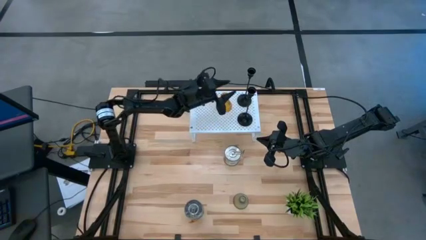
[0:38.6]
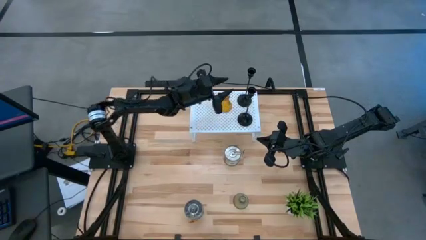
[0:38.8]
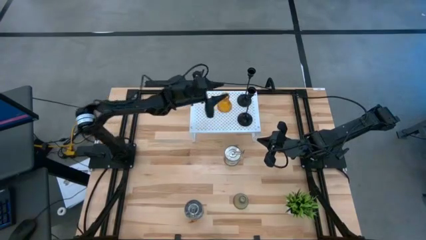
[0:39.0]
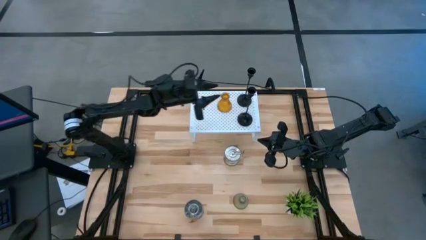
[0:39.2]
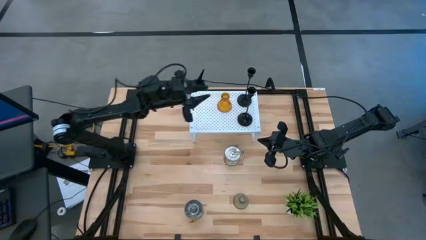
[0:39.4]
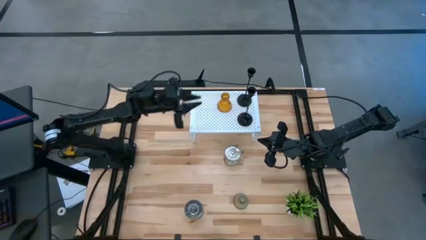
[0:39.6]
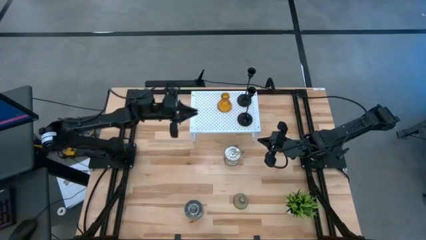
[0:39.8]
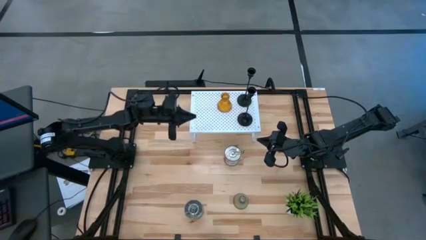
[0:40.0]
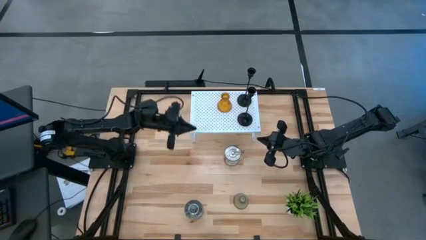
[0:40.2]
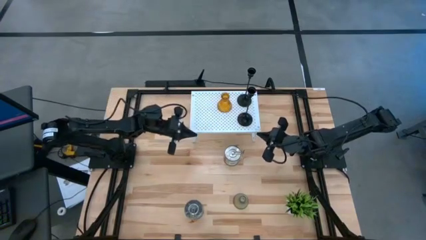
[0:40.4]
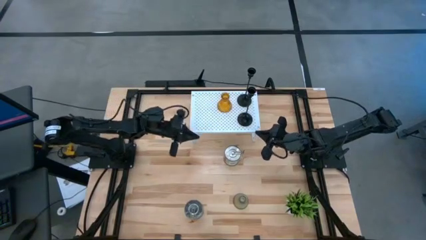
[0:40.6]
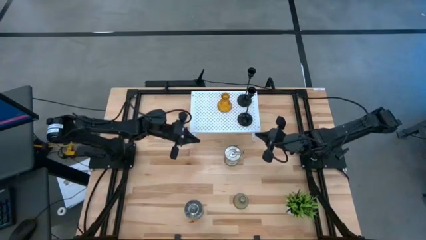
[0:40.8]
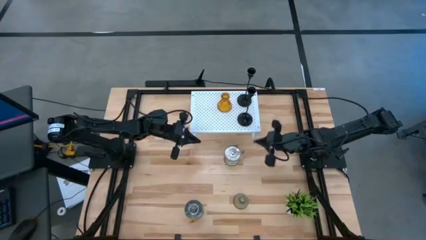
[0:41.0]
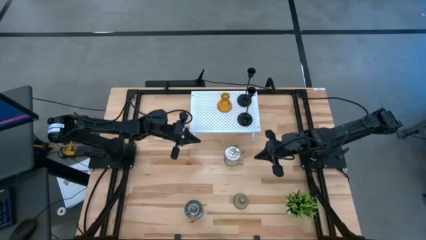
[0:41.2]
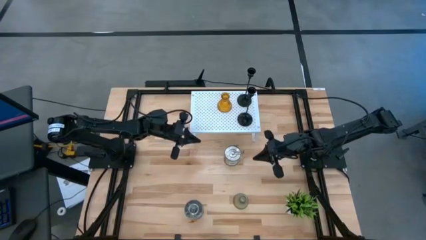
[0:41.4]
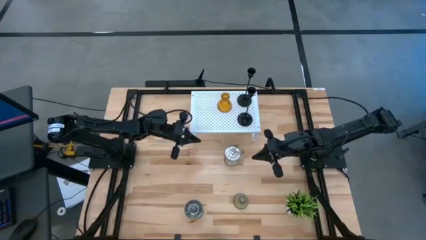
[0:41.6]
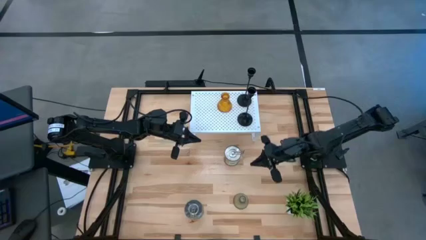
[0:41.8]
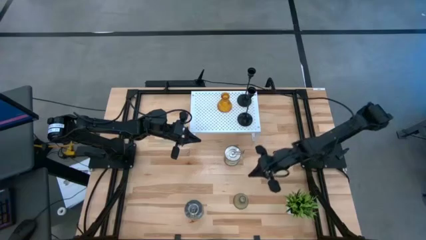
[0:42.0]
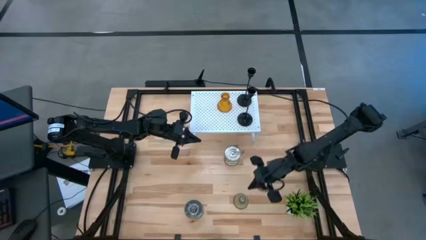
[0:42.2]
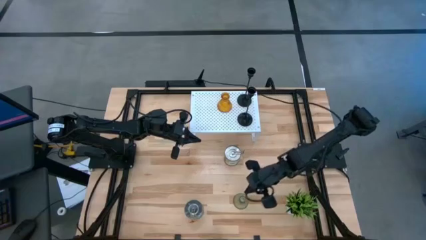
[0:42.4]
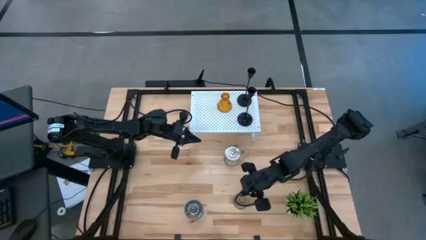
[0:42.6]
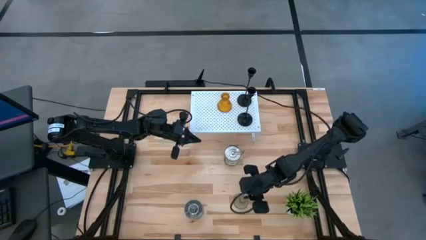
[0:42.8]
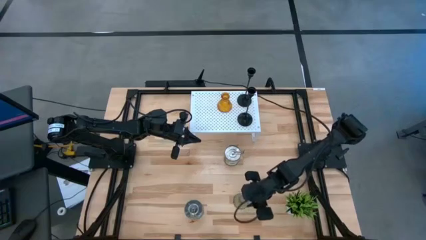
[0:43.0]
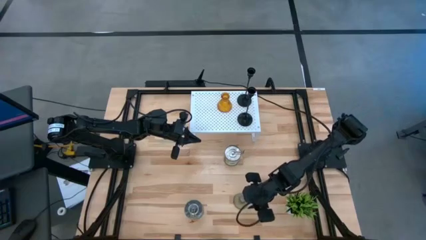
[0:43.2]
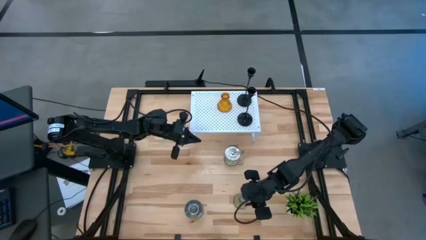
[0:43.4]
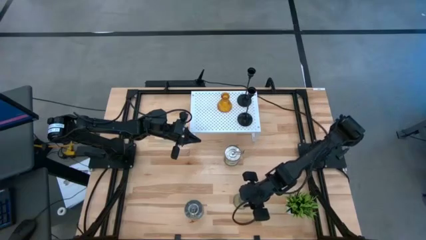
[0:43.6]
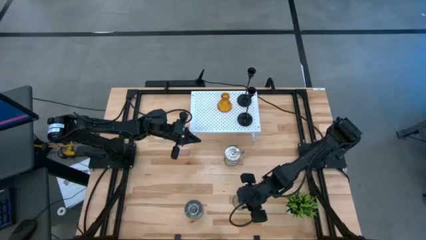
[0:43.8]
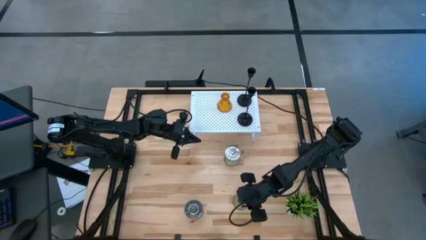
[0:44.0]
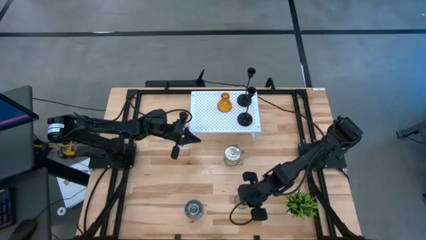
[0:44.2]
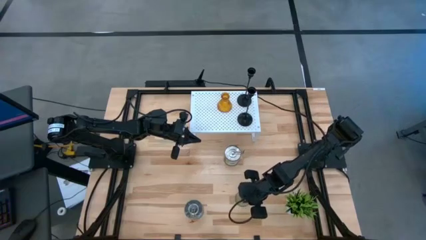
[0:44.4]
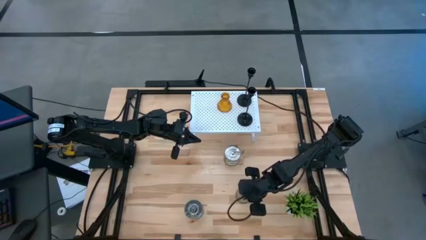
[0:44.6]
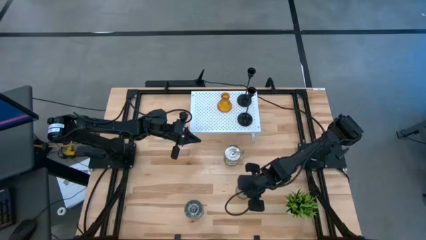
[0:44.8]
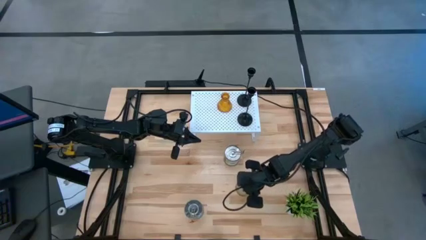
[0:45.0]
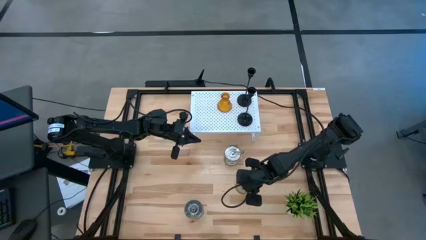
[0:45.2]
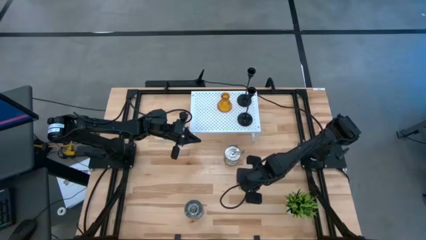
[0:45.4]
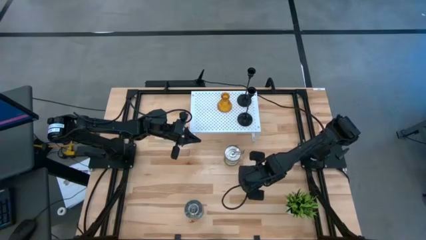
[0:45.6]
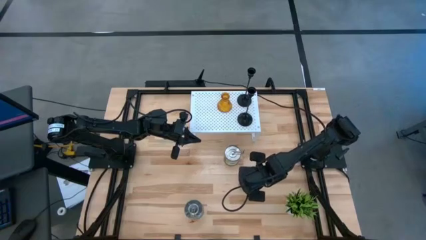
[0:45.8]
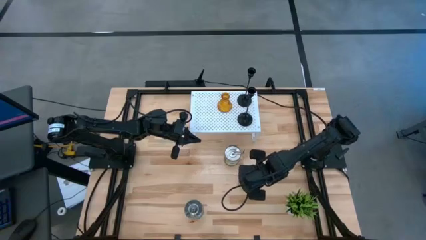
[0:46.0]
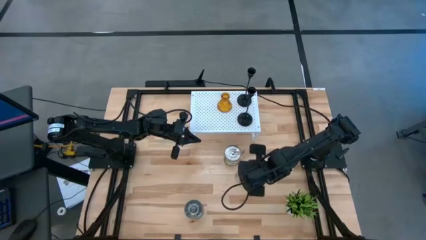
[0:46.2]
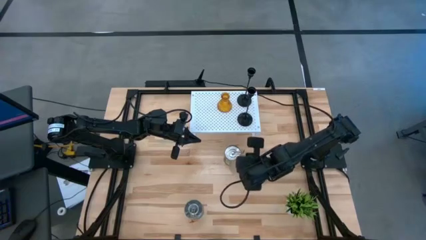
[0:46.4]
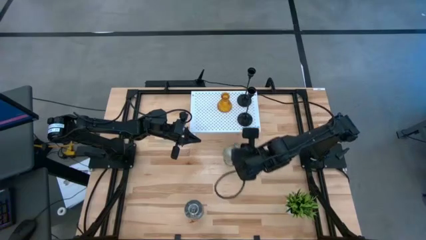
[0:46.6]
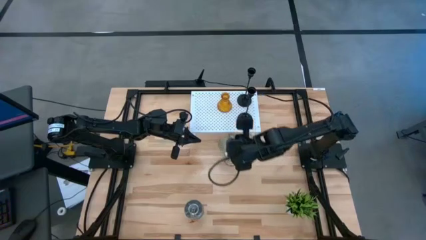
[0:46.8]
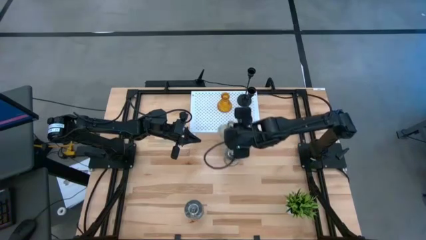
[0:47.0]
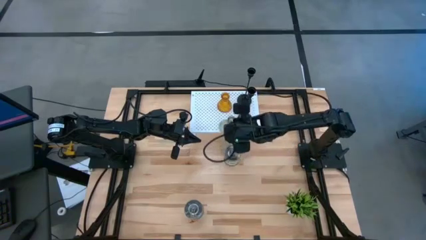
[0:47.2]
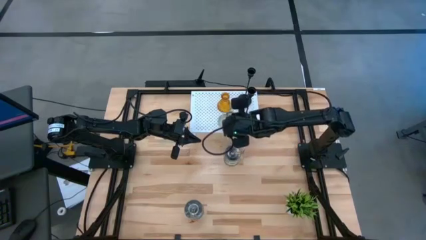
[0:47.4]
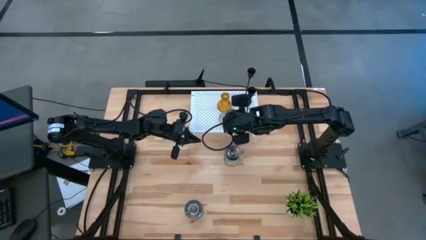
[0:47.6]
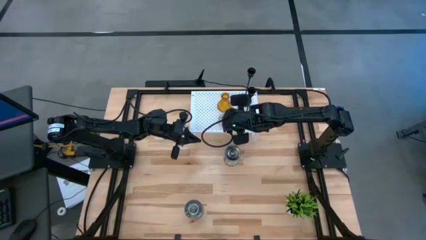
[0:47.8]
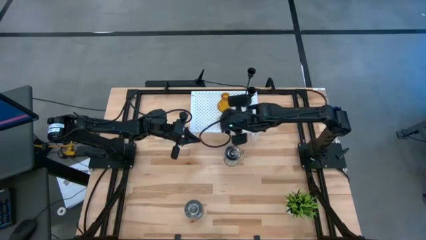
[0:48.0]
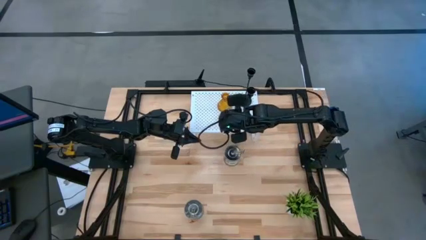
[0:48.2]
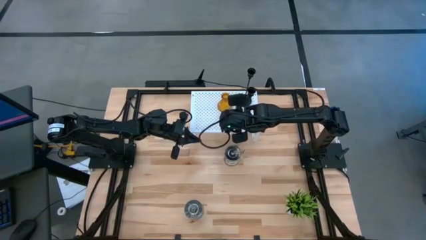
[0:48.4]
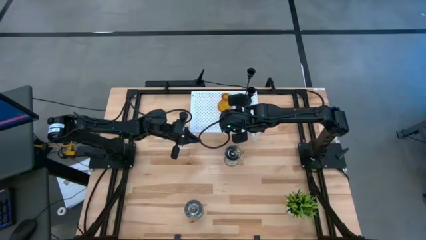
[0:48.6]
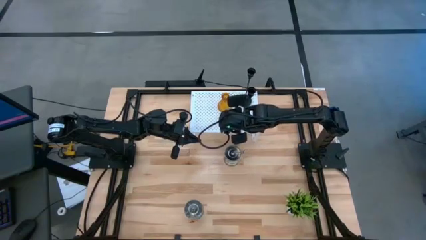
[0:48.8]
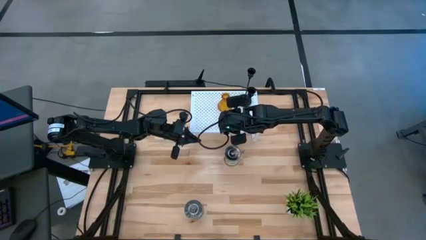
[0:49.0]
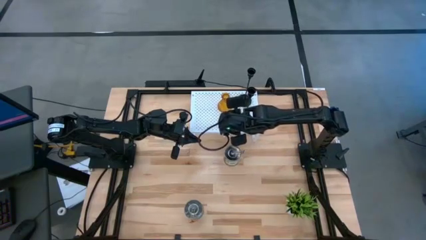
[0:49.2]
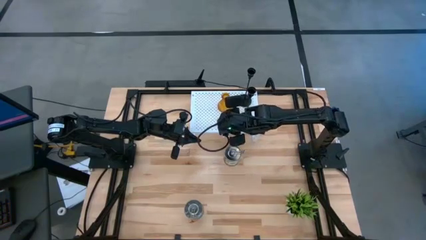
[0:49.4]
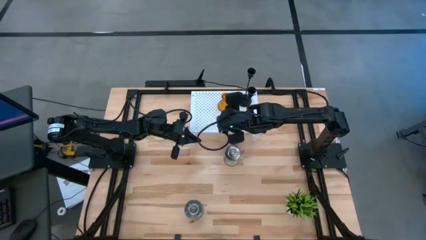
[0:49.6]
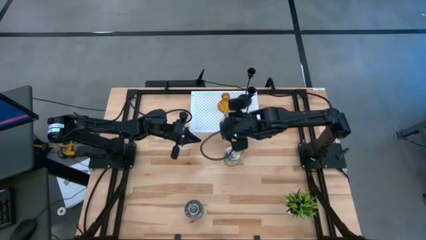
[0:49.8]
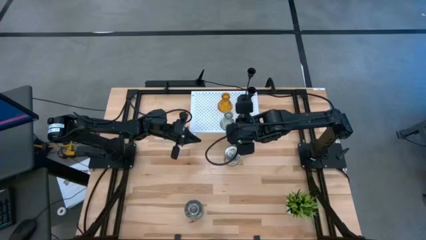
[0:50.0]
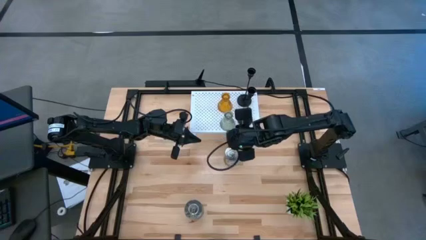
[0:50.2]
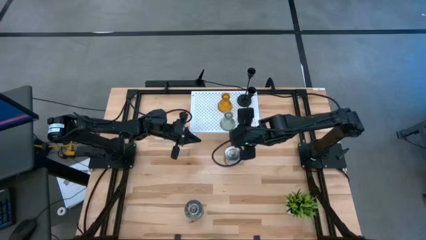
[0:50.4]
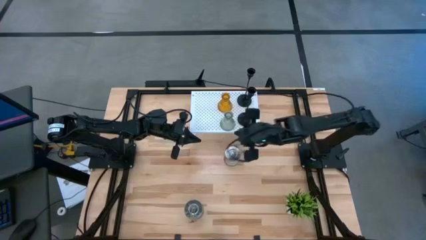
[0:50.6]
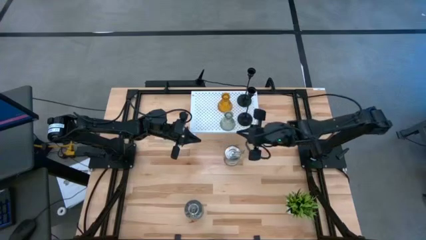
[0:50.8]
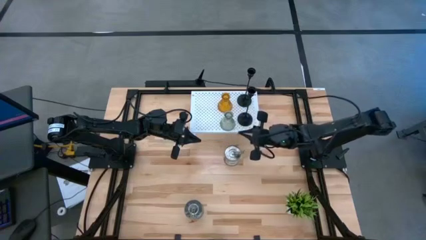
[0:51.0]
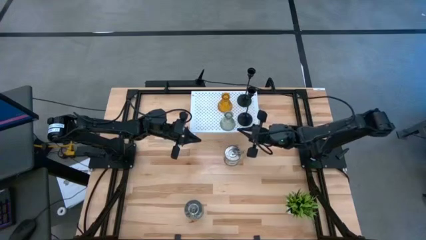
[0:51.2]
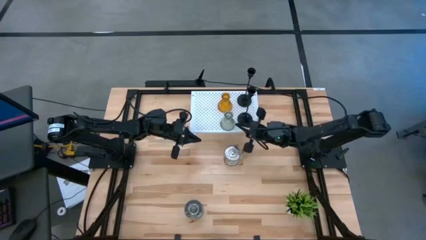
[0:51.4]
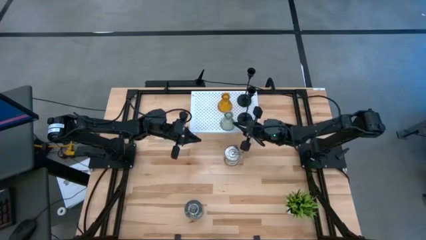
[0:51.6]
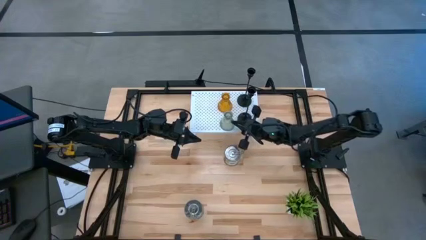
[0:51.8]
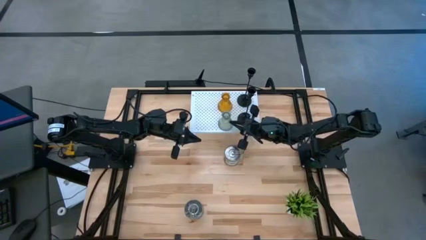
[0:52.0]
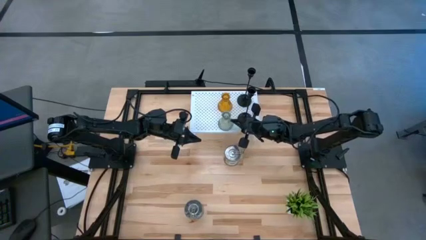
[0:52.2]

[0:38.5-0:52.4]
Task: Pick & Place candle stick holders
Put the green glass candle holder on the shelf align with the other brown candle holder

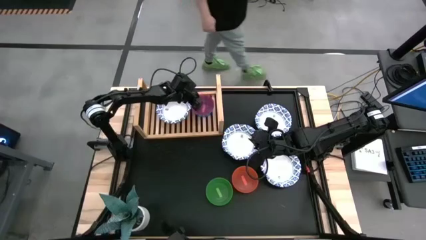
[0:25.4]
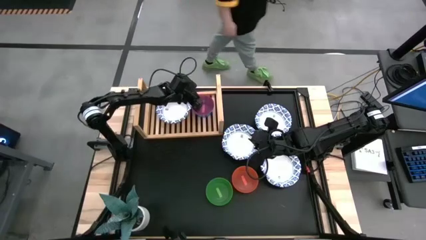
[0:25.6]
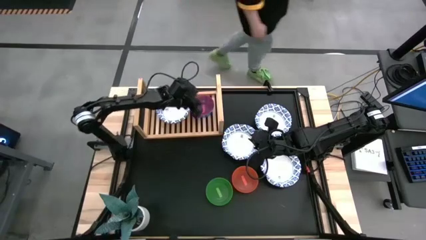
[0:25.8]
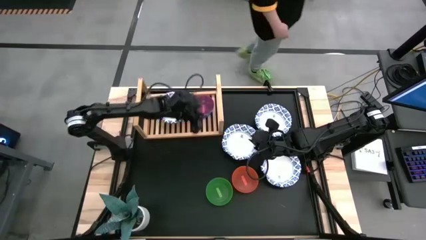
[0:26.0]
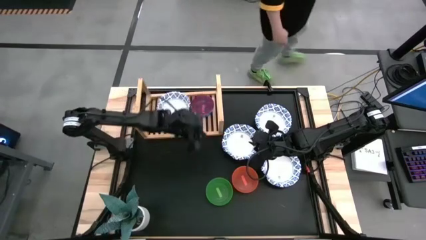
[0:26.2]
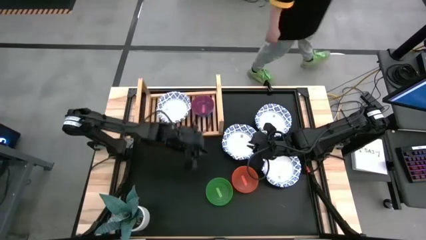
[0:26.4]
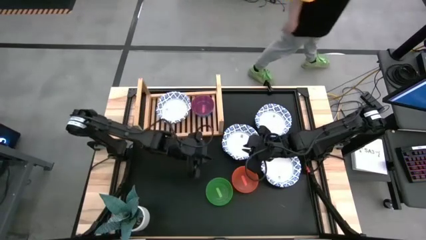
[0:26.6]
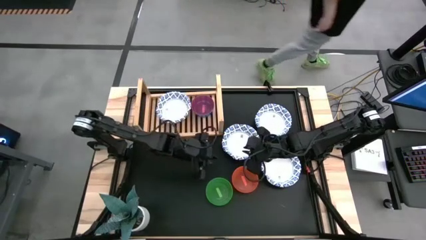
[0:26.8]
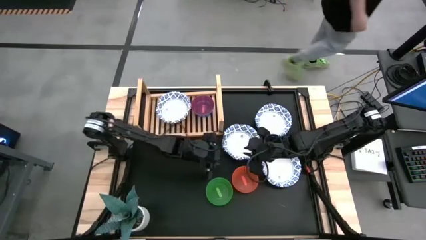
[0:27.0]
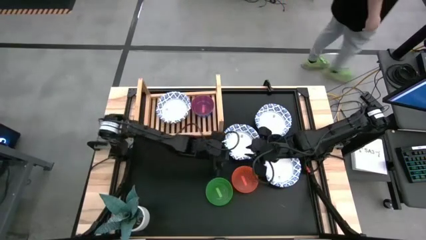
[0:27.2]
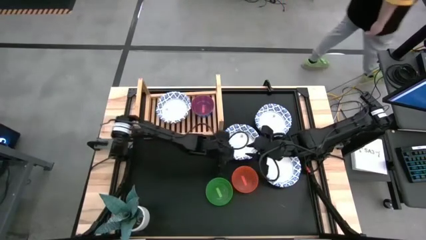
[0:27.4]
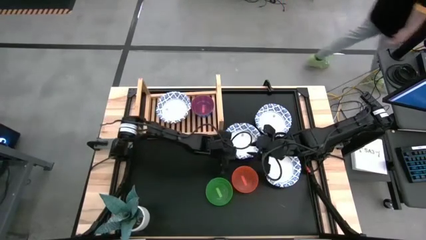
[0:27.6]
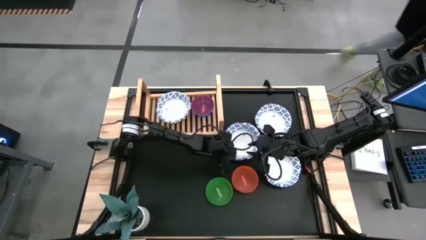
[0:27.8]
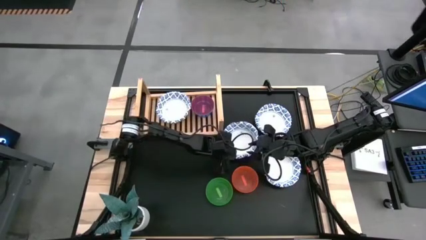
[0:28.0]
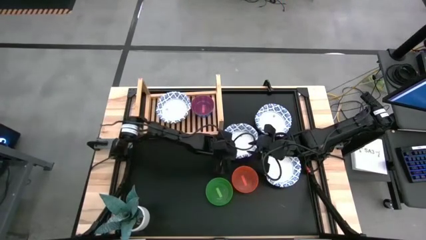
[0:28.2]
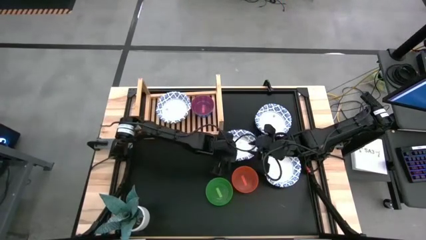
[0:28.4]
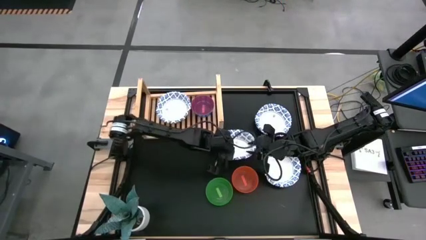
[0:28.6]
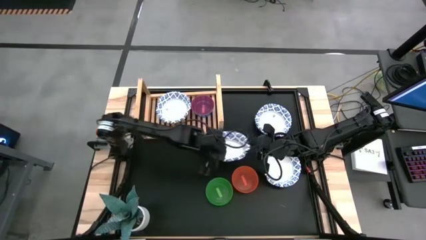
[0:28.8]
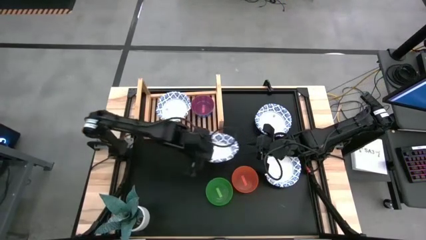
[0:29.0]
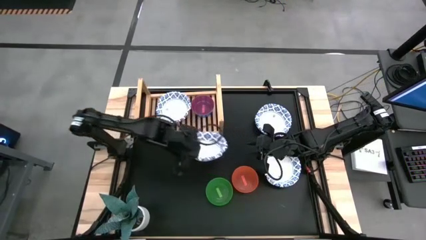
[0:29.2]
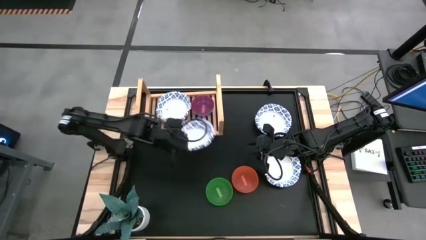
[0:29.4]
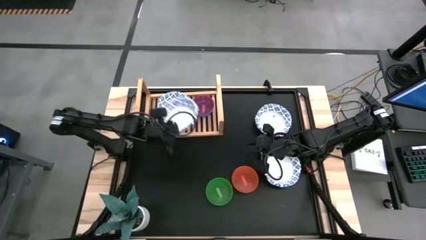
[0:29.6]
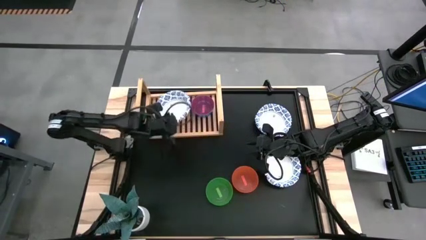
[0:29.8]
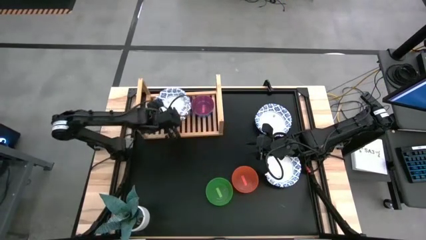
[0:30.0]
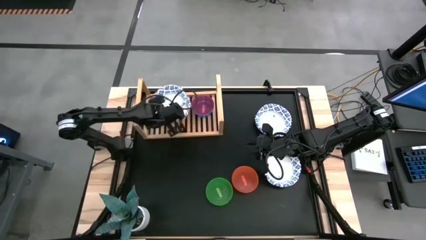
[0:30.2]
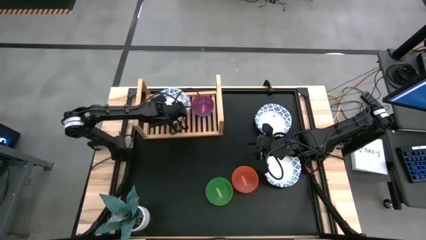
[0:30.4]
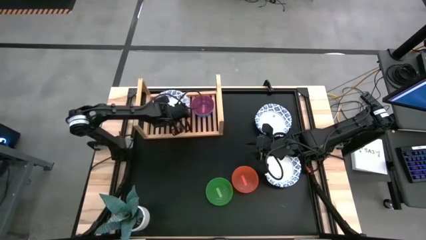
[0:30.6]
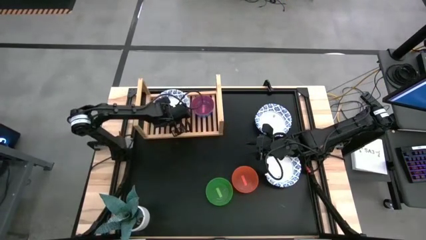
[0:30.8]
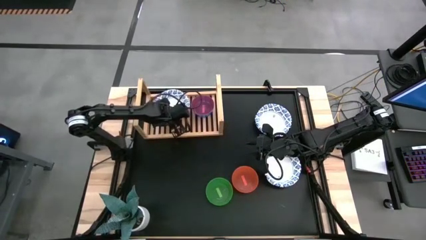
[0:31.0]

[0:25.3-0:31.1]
Task: Place and stack bowls onto a shelf
Stack the middle white patterned bowl on top of the other white patterned bowl on the shelf
